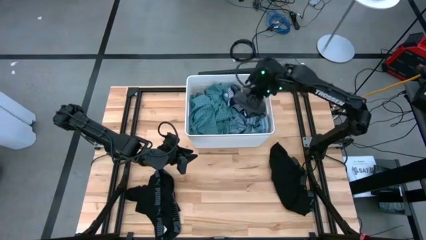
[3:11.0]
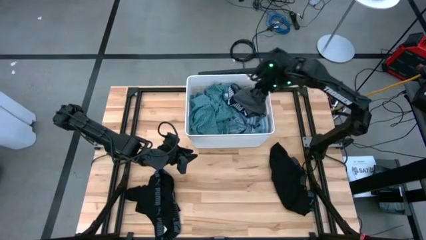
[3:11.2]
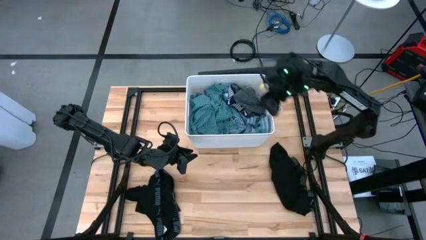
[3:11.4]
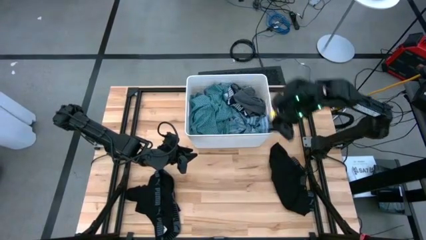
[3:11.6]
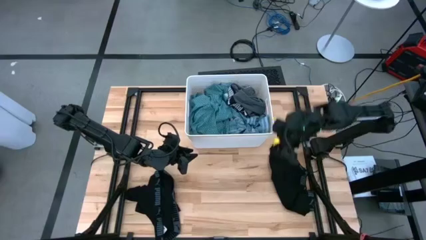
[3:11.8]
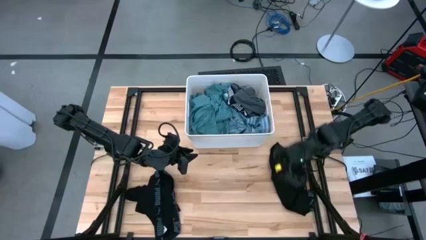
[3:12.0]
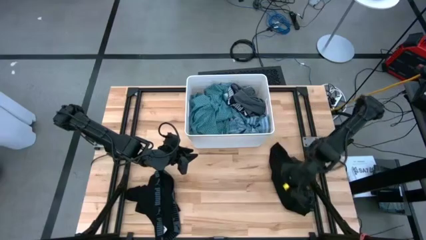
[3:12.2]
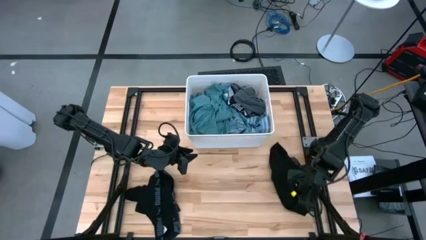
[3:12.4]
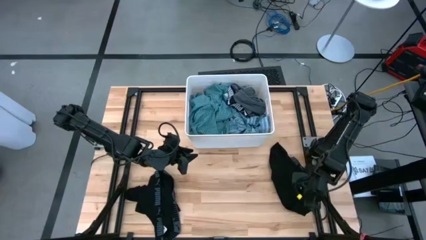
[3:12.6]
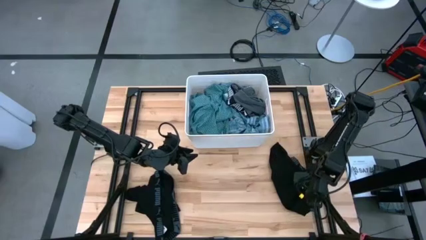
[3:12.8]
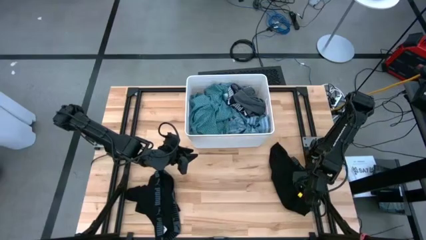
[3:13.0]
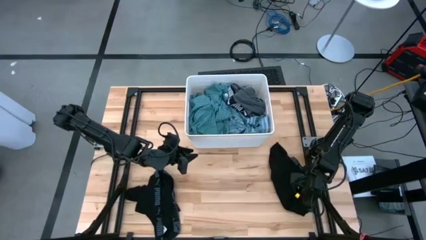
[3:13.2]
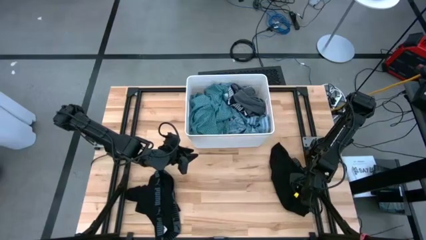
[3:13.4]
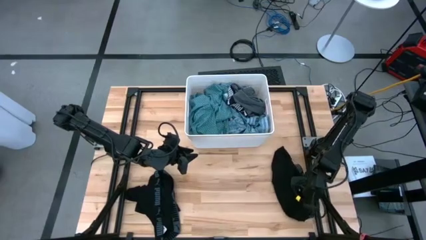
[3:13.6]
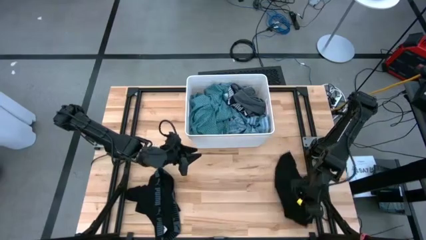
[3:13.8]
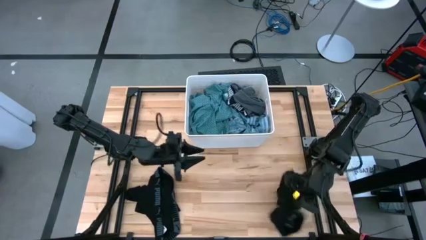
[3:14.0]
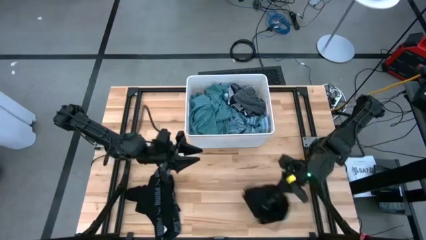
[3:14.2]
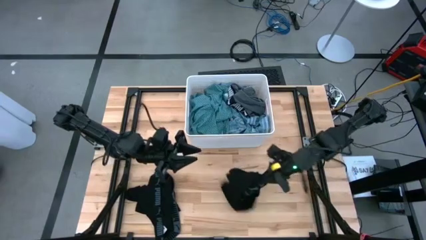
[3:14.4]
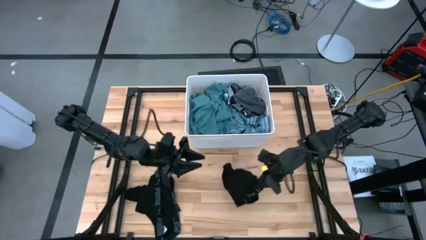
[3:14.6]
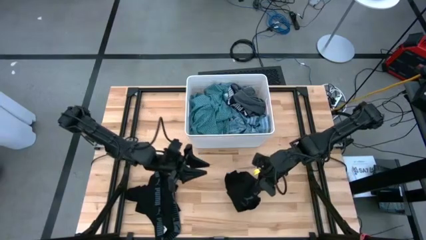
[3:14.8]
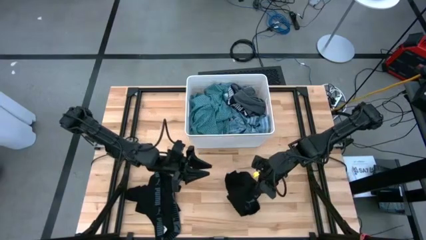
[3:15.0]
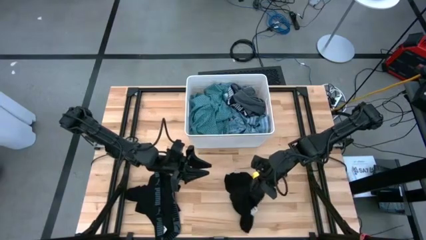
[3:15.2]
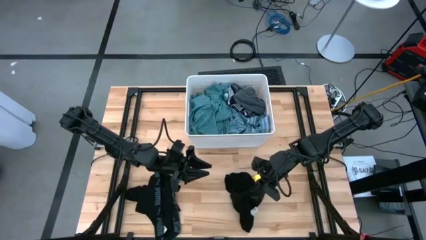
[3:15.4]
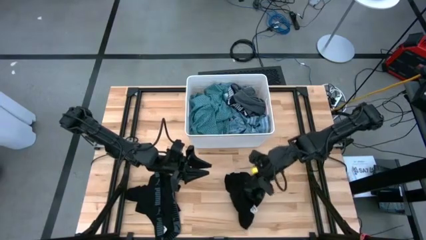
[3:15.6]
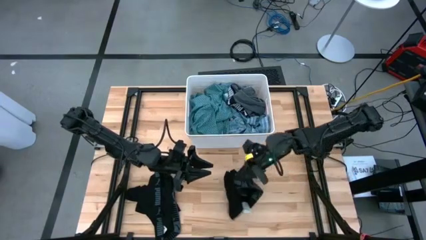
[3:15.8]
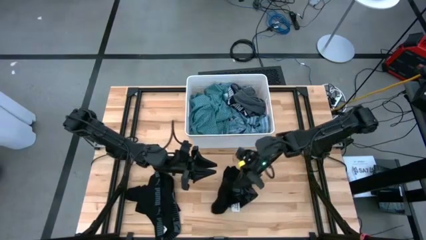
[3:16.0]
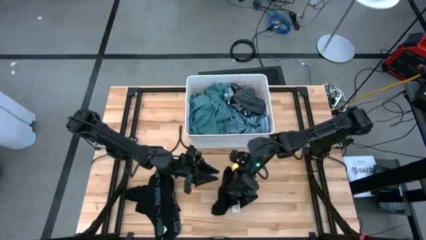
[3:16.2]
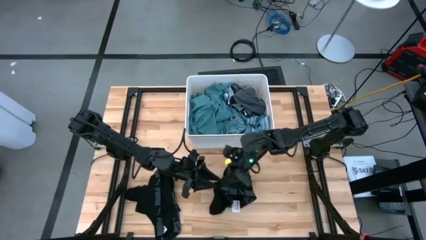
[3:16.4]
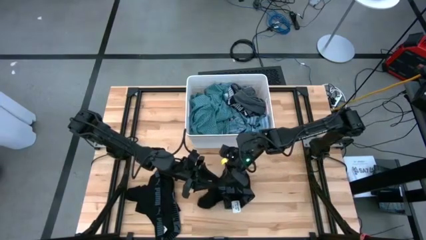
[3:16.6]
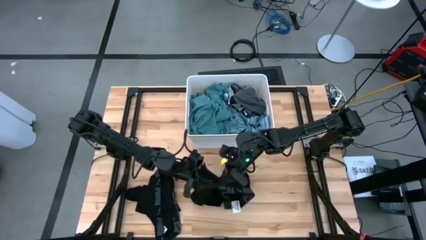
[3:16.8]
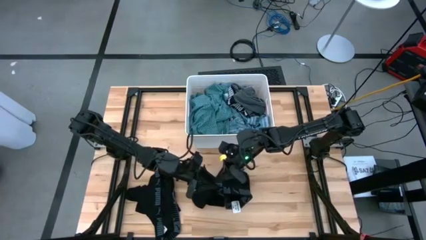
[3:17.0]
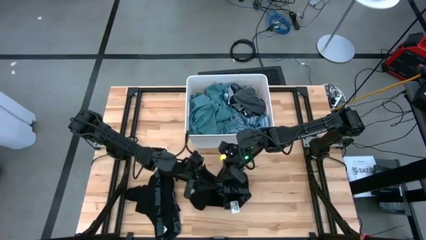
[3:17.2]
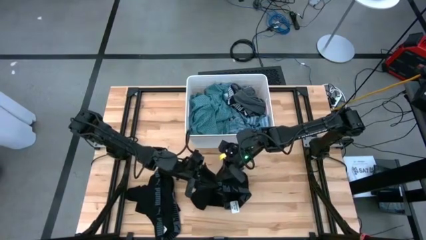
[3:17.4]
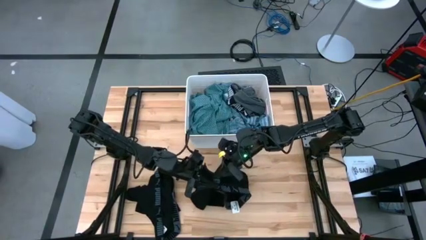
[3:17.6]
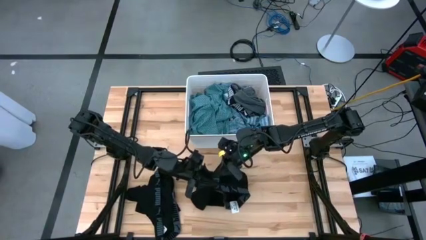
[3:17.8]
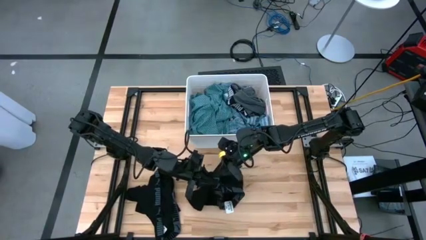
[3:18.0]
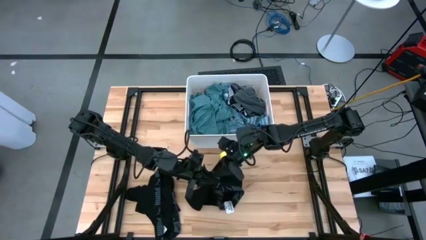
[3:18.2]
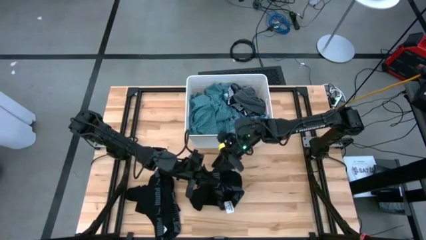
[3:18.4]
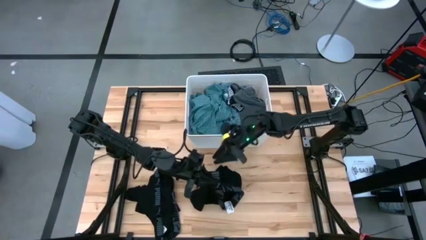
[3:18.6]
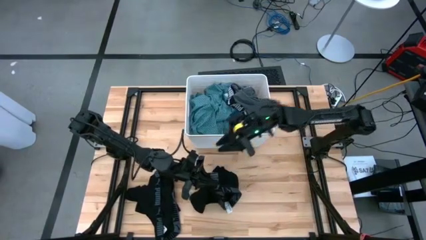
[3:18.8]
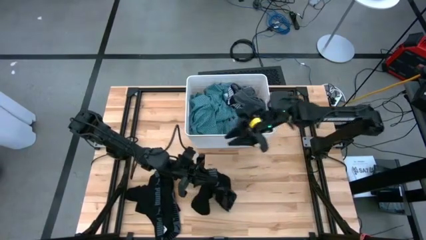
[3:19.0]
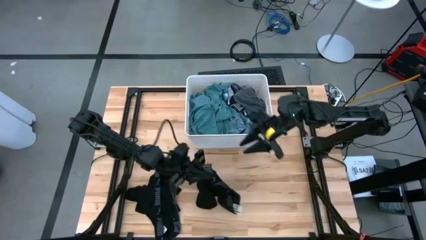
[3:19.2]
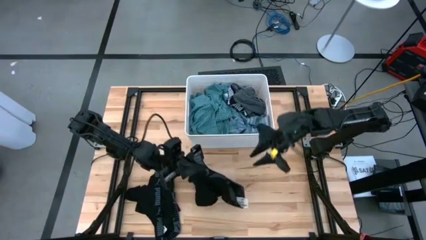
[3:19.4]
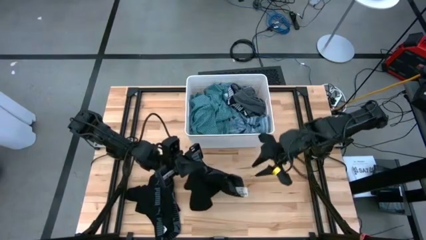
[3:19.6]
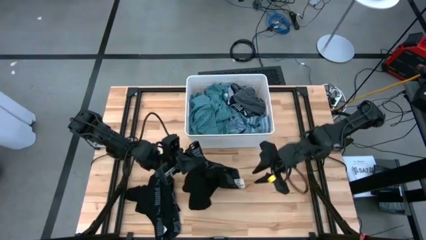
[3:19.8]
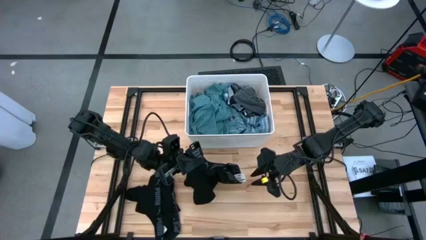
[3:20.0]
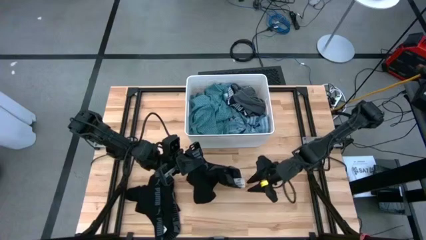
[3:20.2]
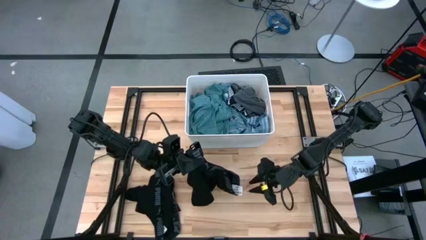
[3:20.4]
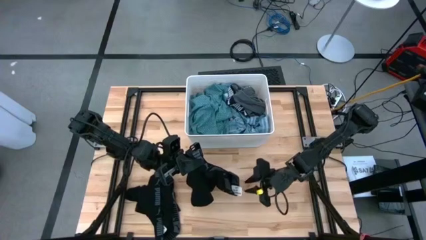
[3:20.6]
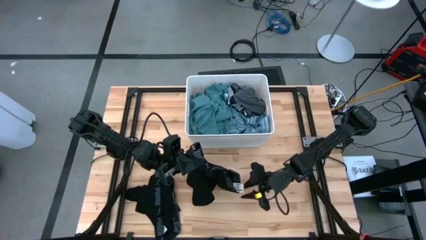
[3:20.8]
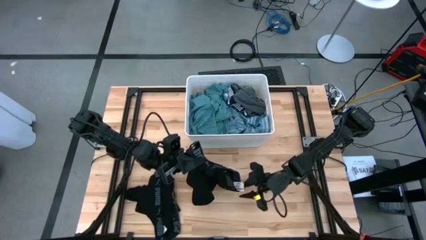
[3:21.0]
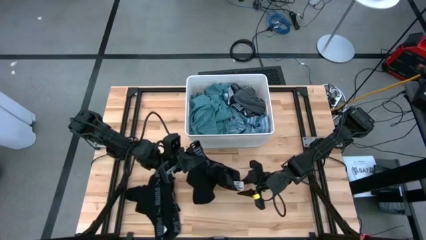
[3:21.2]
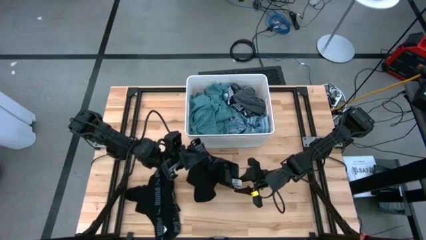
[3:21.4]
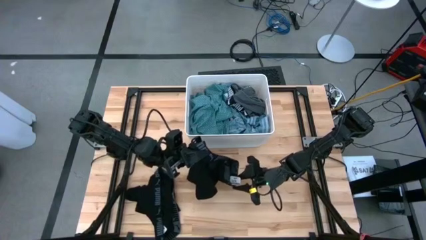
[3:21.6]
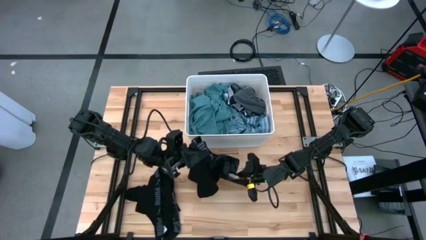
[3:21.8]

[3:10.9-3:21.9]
Task: Sort clothes
Put the black underwear into the white laundry organizer

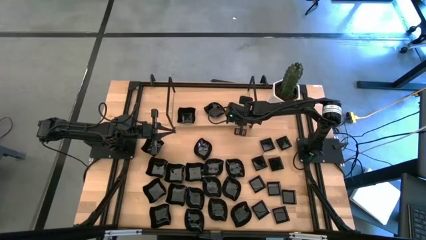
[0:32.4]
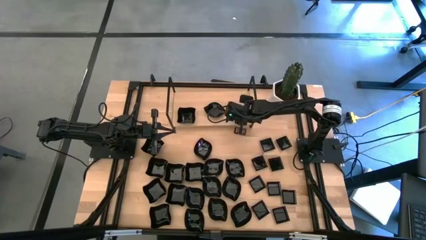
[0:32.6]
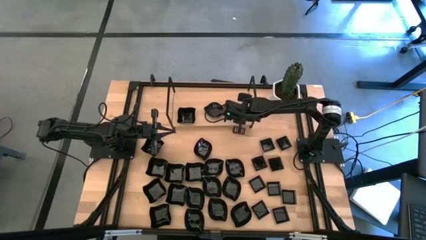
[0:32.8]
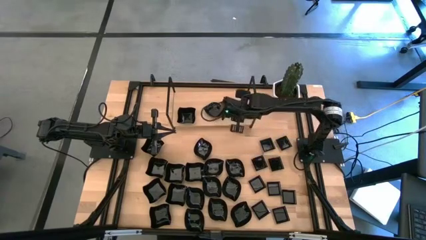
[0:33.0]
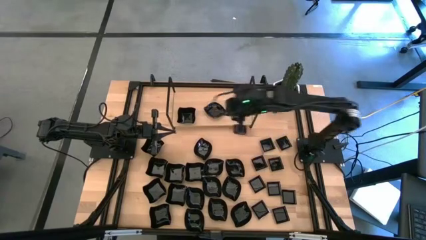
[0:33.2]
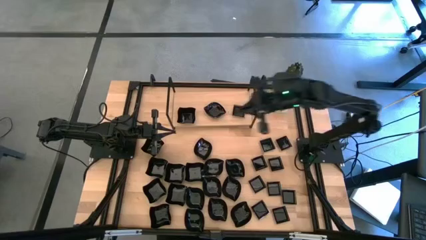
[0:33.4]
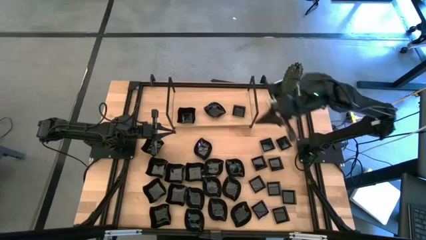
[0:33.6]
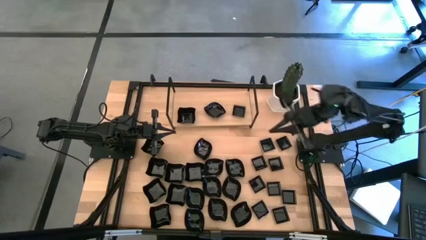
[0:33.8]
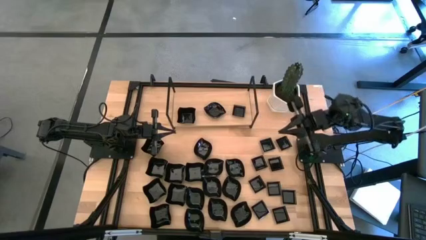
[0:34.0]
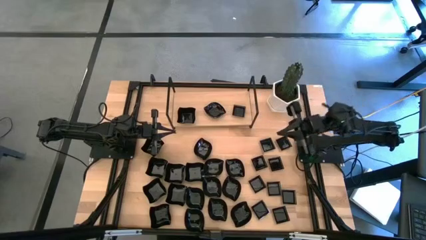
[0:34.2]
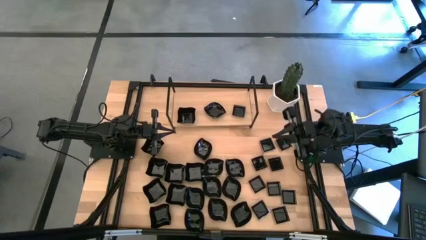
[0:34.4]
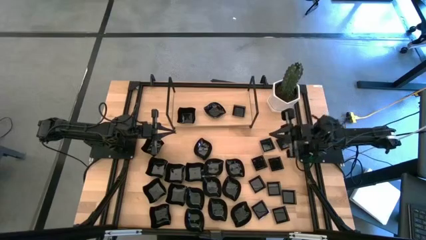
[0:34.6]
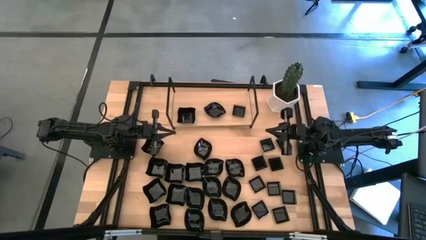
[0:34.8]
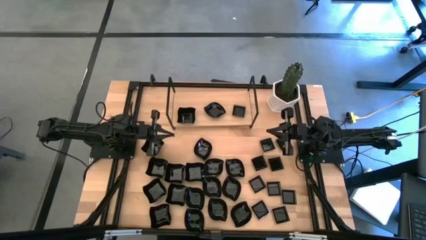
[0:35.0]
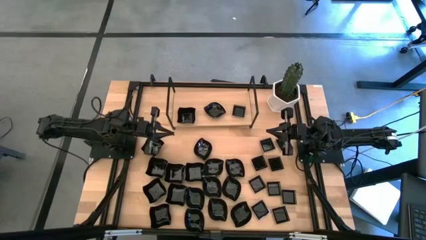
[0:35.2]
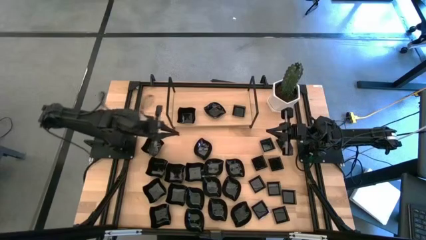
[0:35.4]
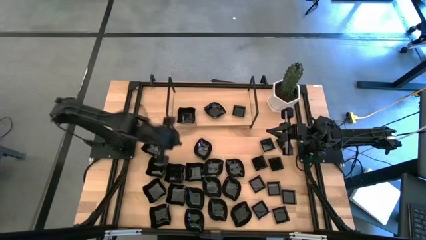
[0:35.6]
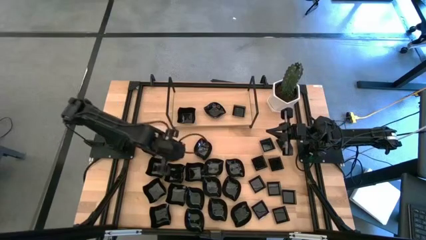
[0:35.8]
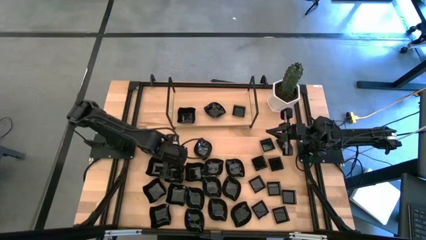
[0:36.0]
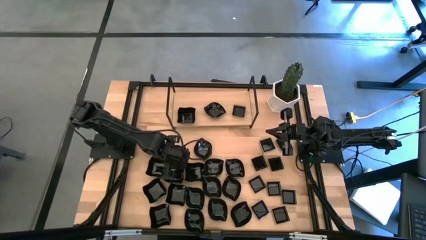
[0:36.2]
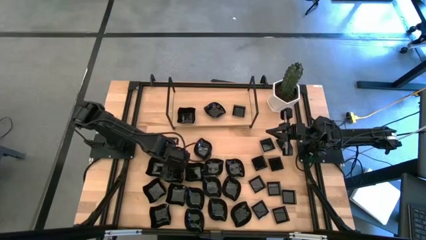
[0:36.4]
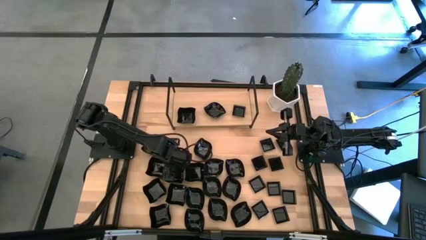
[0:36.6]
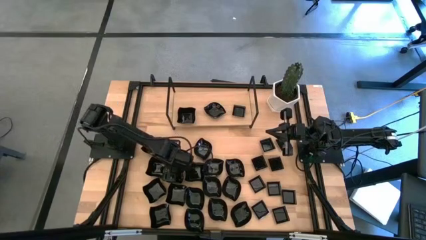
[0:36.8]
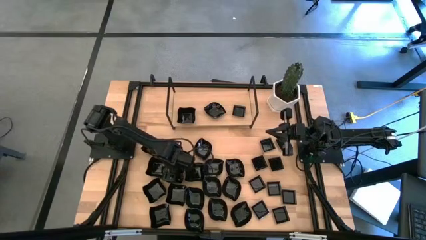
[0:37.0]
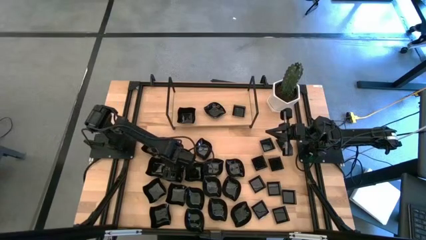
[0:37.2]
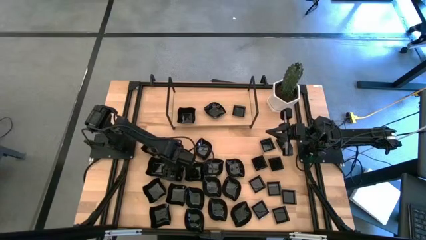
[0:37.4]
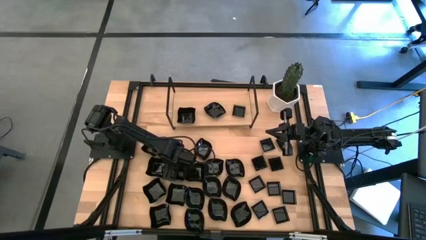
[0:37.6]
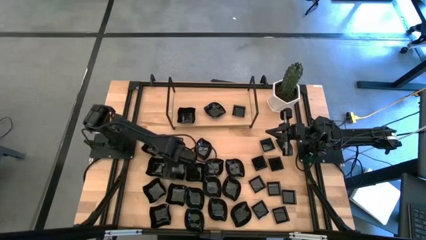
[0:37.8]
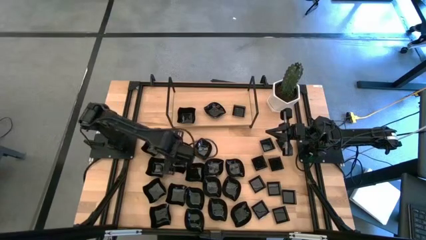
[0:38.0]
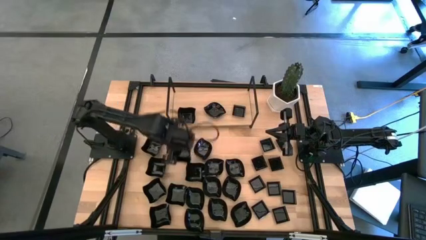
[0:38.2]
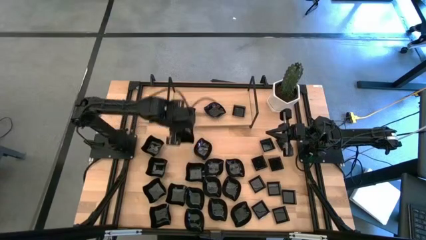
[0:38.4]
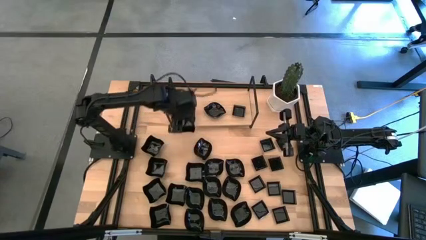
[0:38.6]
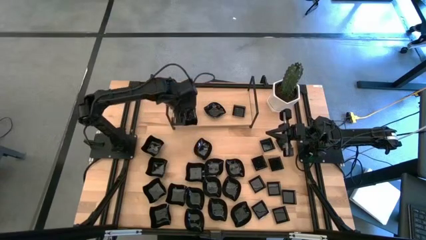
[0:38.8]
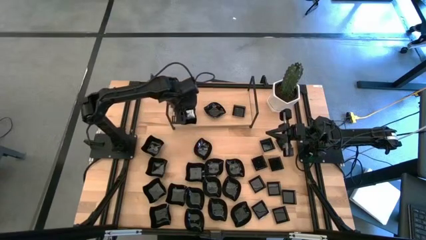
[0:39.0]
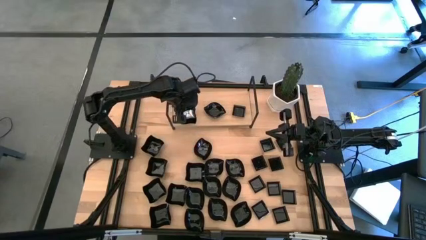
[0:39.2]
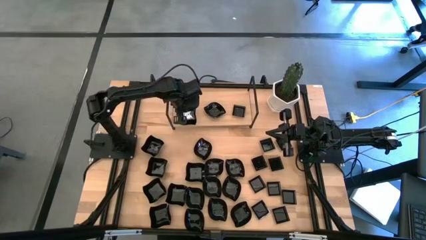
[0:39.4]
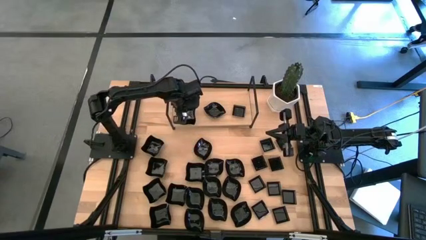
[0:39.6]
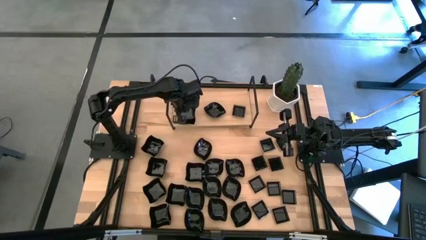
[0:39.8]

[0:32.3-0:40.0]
Task: Pick & Place Mini shaped plates
Stack the black distorted square plate on top of the black distorted square plate on the shelf
